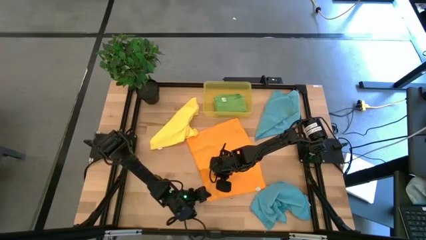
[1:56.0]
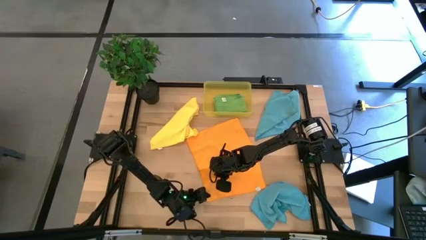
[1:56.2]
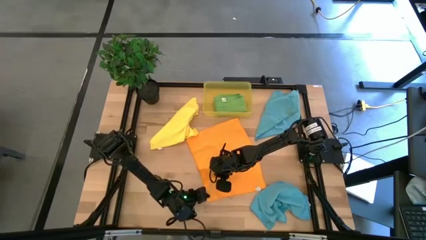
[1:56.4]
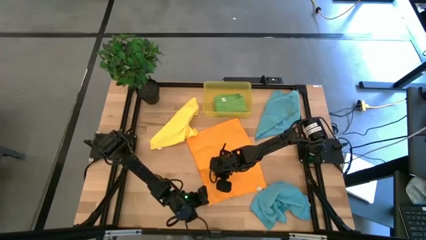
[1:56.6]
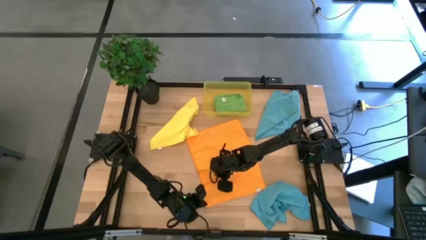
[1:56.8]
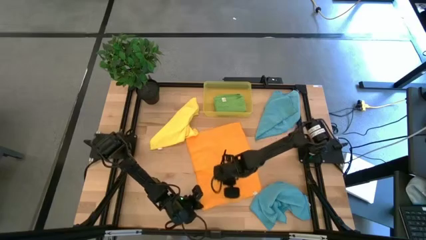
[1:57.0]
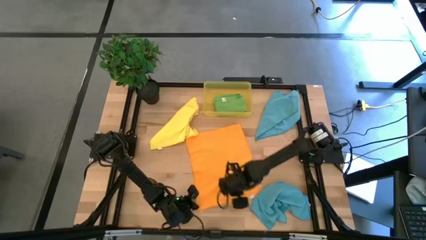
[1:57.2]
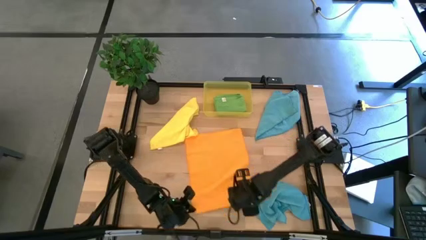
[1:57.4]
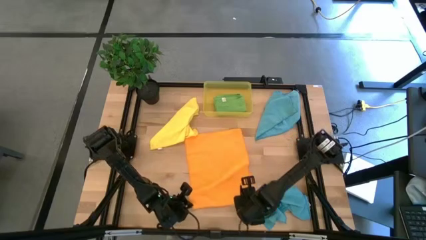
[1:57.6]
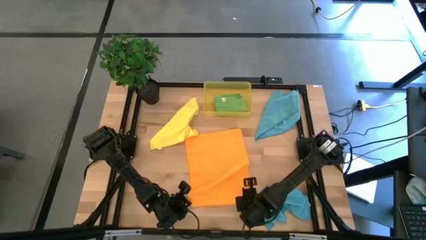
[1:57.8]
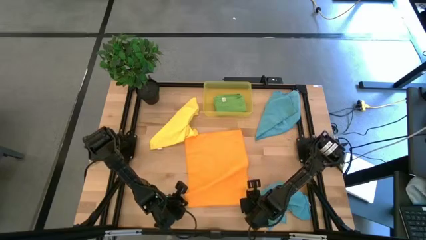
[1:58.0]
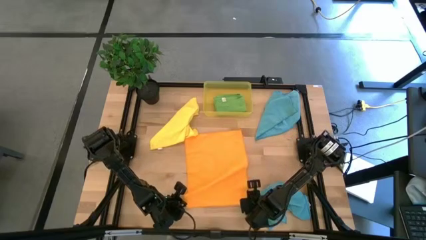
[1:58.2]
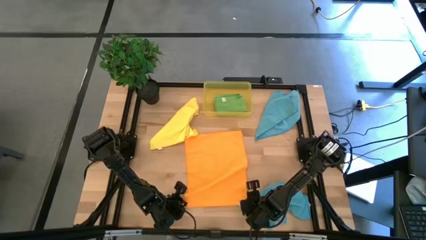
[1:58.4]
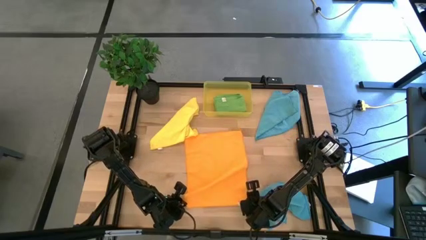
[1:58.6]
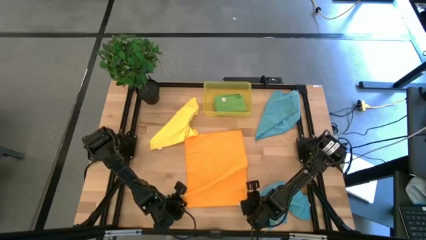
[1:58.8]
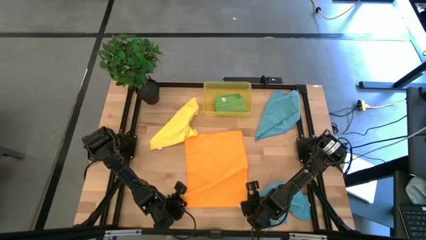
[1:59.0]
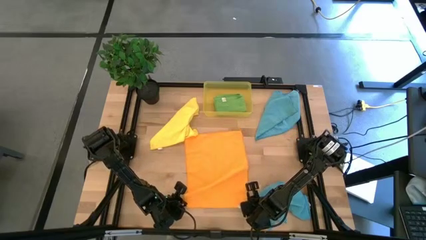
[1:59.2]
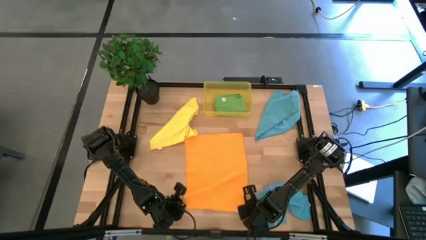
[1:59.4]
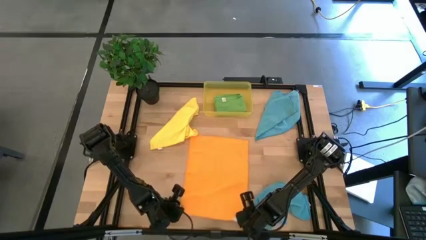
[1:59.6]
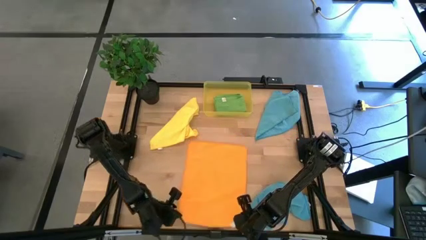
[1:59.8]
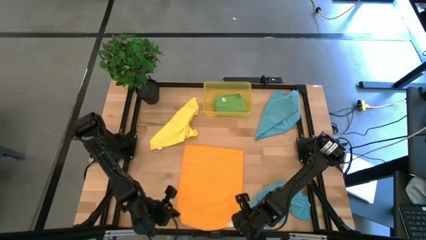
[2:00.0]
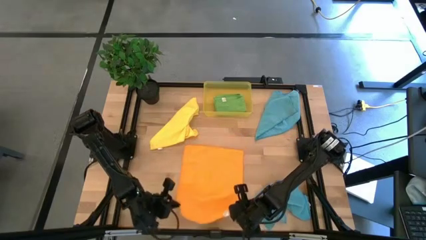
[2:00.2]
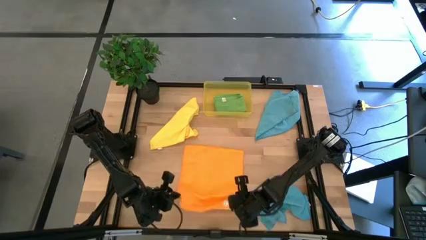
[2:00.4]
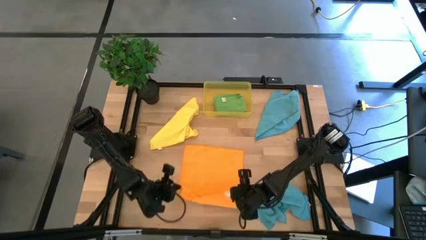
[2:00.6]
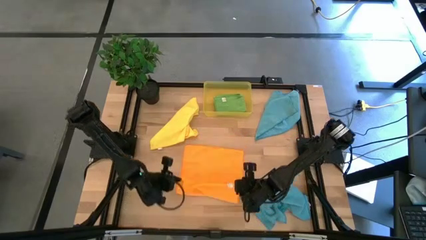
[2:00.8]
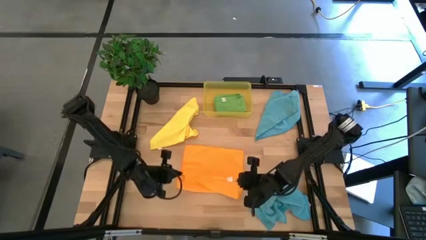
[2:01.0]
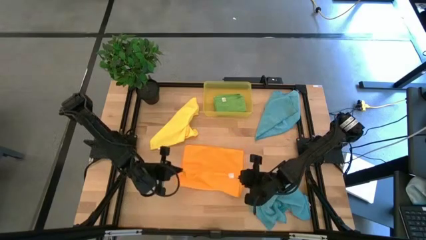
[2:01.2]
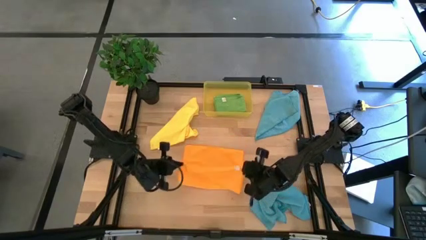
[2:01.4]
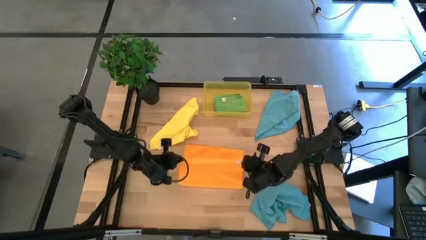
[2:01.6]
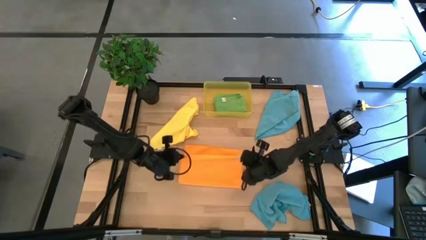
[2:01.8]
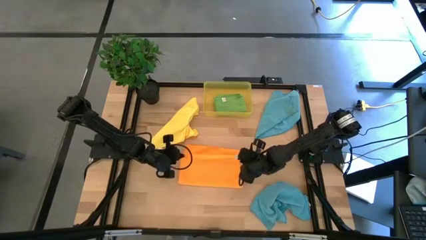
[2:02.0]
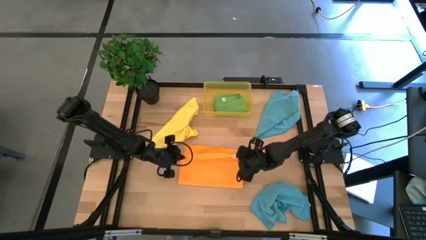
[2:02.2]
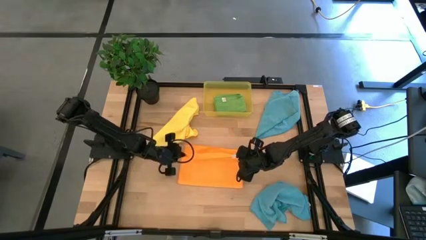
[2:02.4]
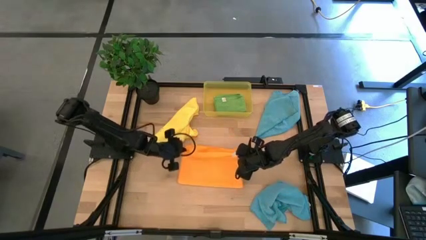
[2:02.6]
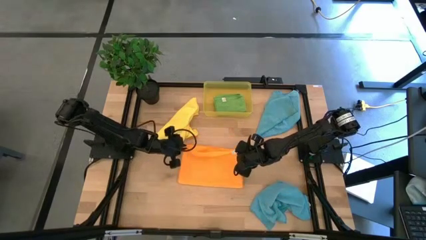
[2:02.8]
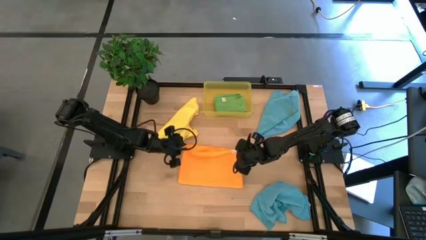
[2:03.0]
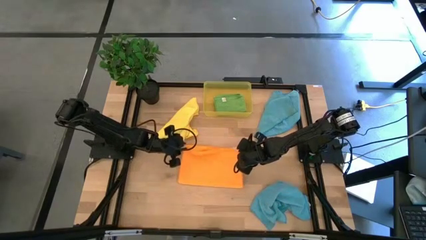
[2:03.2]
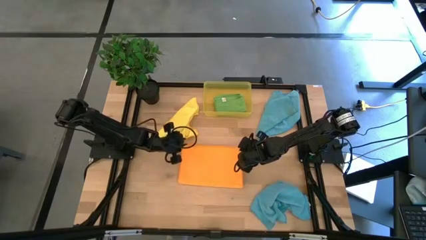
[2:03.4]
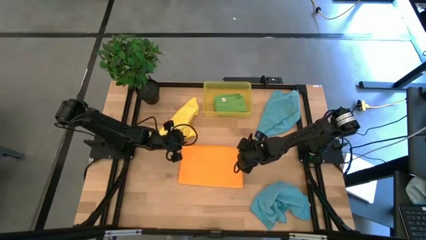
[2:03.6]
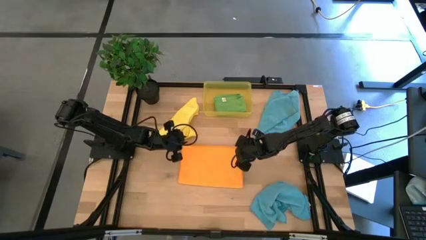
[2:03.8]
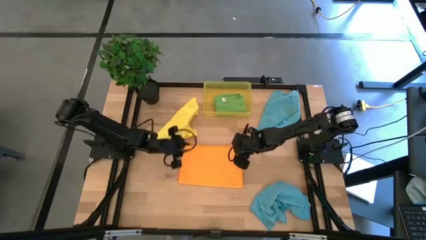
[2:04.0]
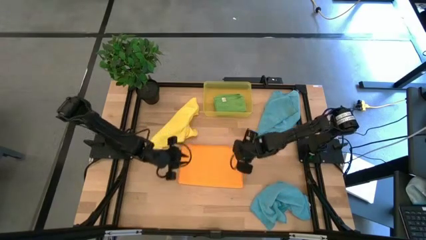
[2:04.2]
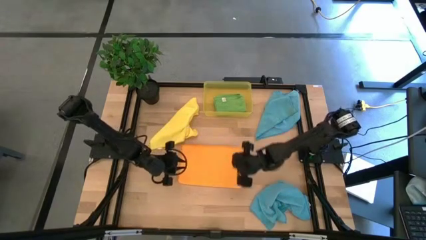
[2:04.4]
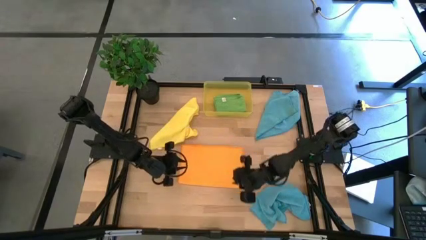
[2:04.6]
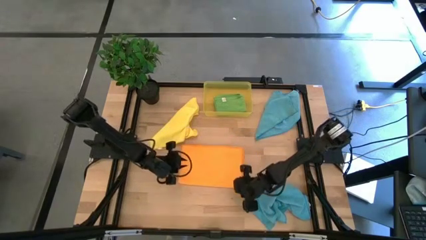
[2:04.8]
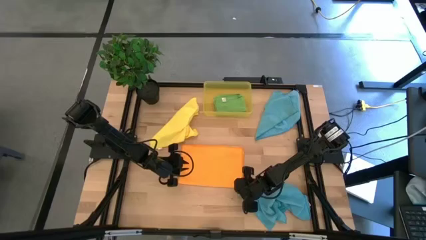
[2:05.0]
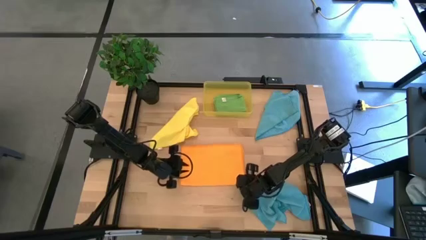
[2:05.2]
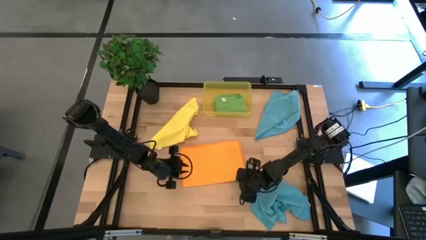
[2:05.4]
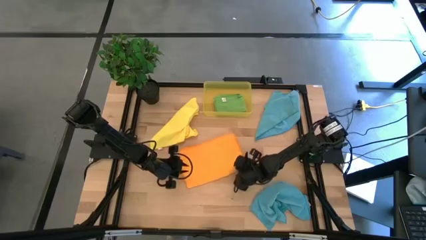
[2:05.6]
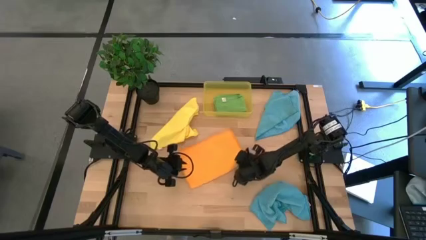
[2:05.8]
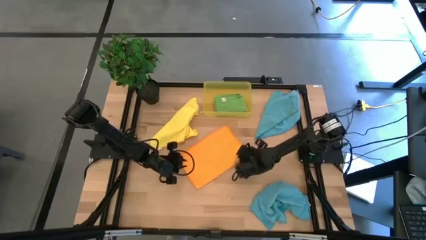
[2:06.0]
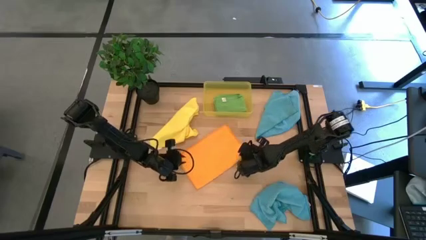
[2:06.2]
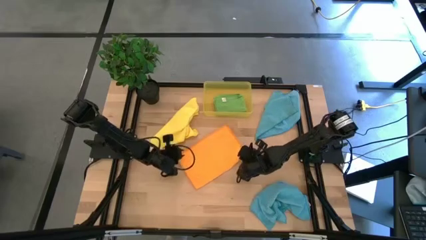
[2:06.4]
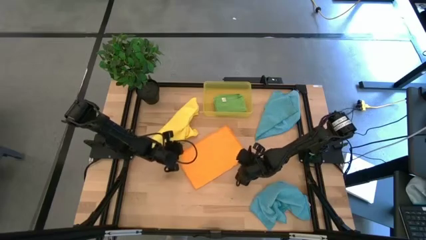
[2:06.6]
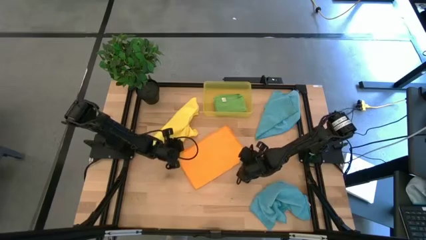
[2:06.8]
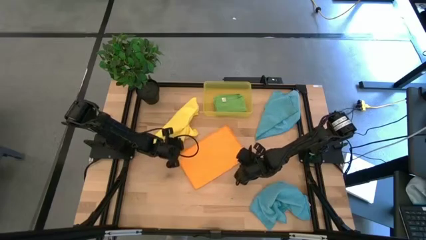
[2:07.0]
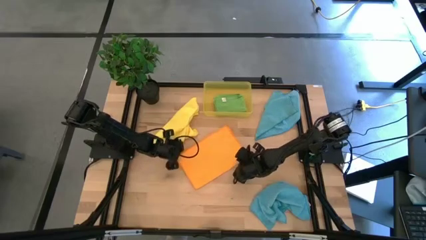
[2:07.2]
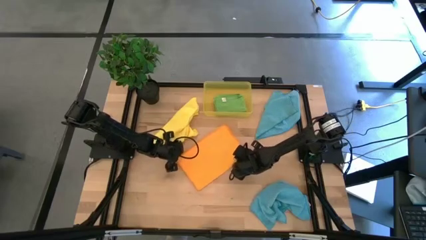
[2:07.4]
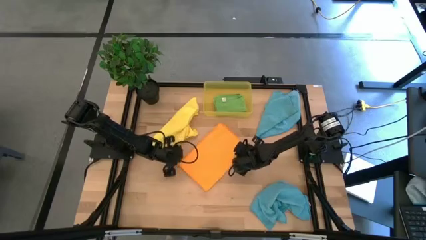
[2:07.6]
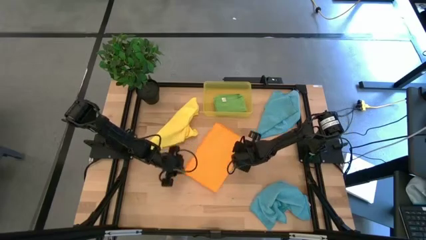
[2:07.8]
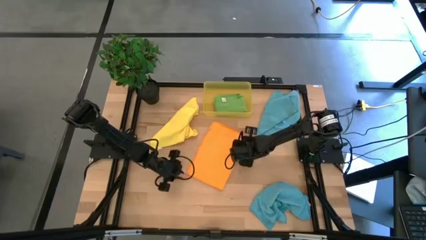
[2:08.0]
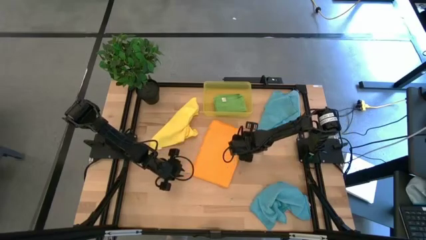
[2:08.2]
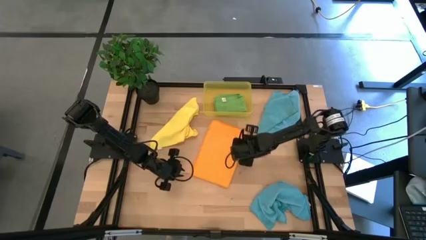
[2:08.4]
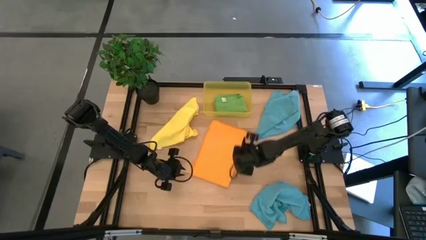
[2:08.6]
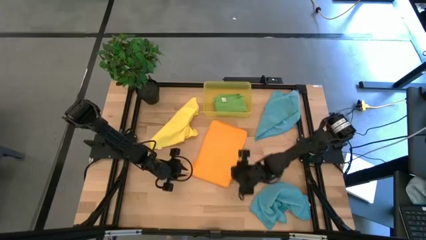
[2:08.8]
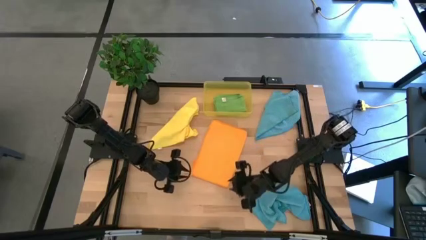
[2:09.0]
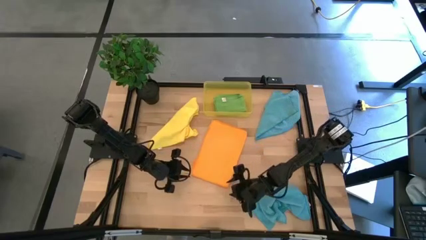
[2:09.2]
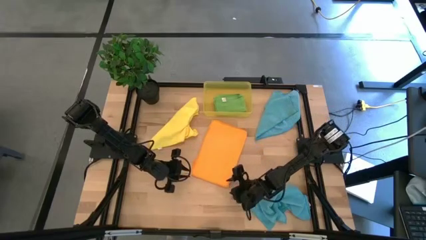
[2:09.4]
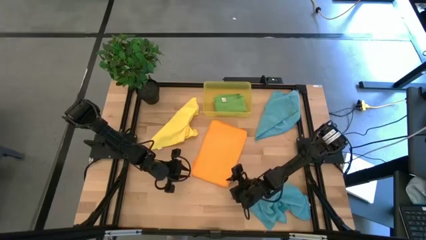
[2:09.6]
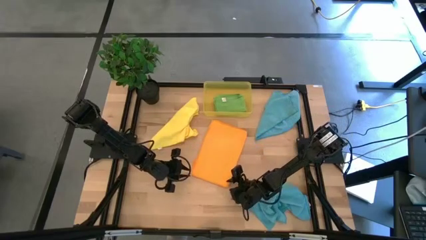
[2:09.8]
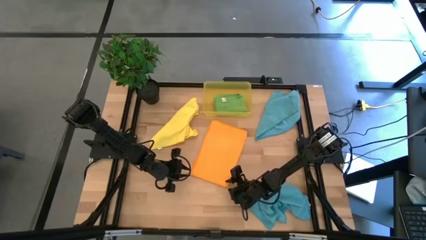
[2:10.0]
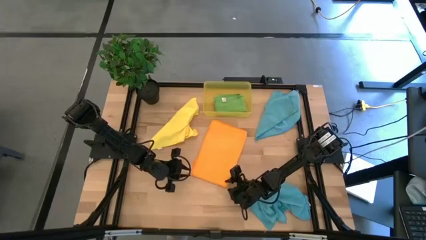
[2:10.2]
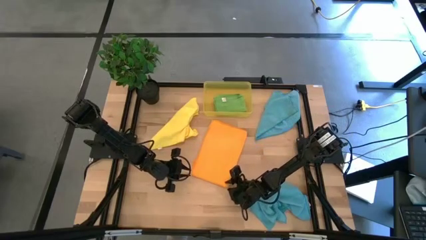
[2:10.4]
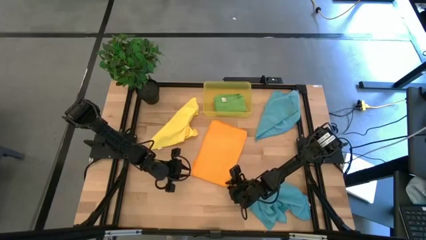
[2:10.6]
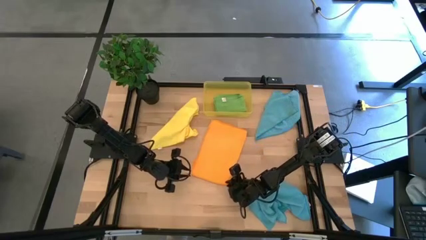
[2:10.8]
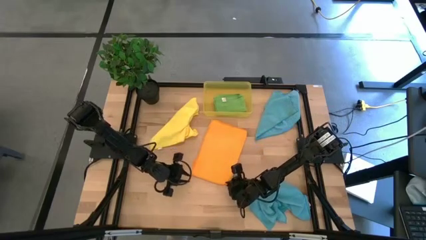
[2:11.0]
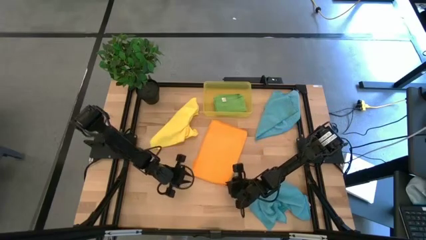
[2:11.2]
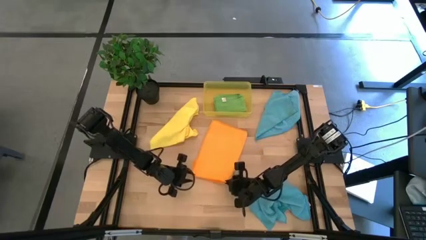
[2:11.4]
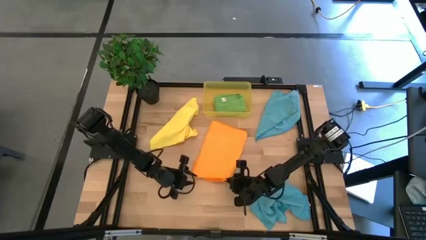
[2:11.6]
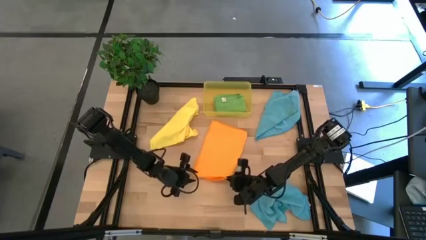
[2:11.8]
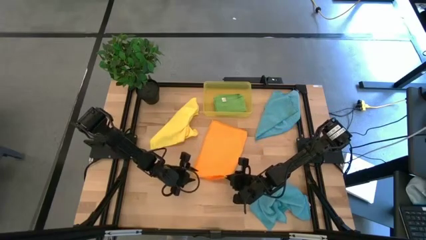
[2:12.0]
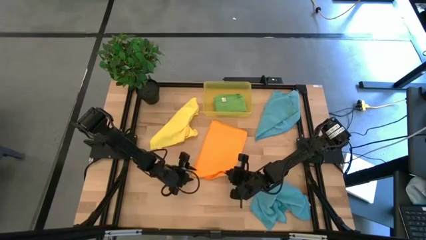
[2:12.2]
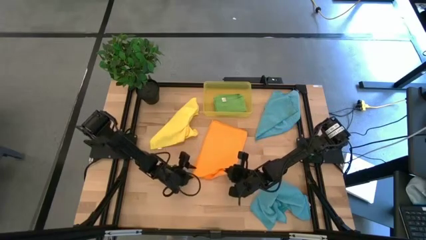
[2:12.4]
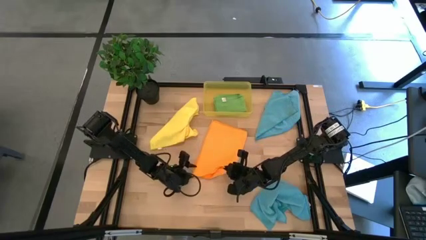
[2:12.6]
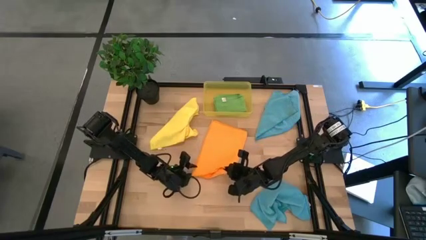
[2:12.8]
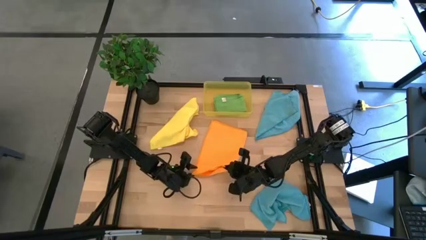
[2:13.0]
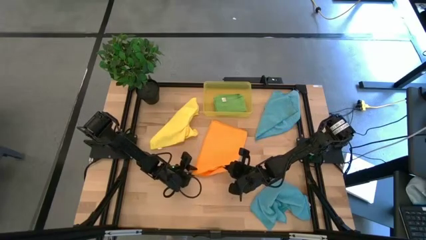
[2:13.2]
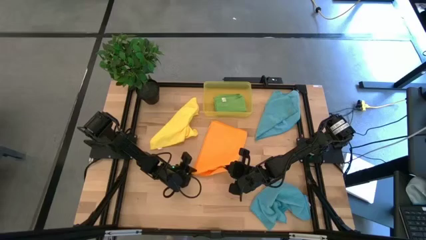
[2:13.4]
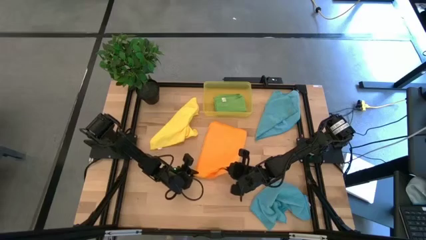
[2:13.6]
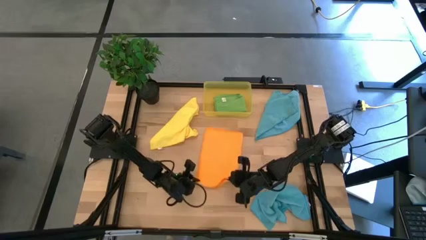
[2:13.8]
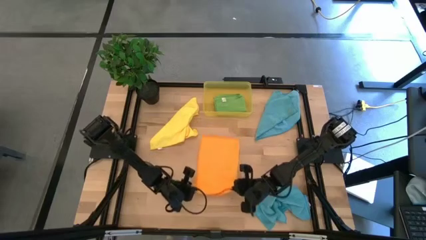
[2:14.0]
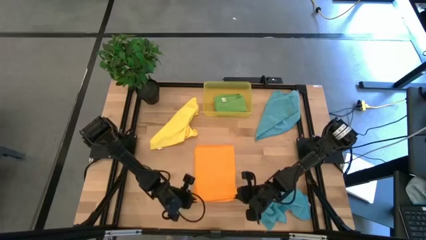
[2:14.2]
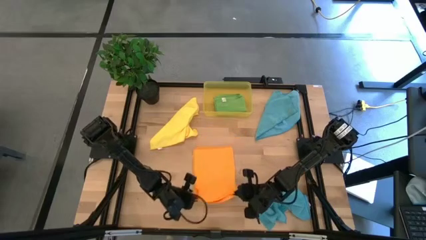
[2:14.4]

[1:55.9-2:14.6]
Task: Fold microfiber towels
Fold the orange microfiber cloth
